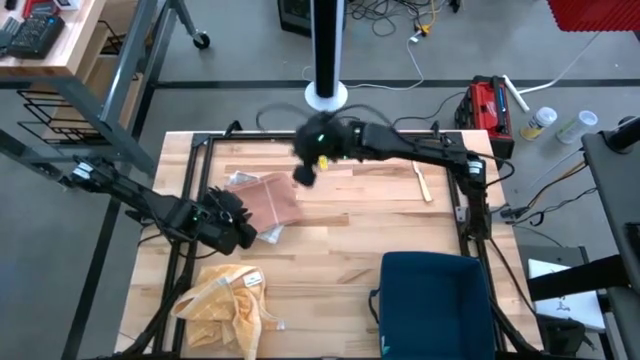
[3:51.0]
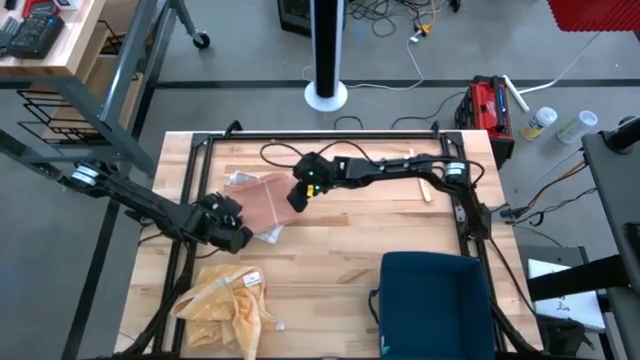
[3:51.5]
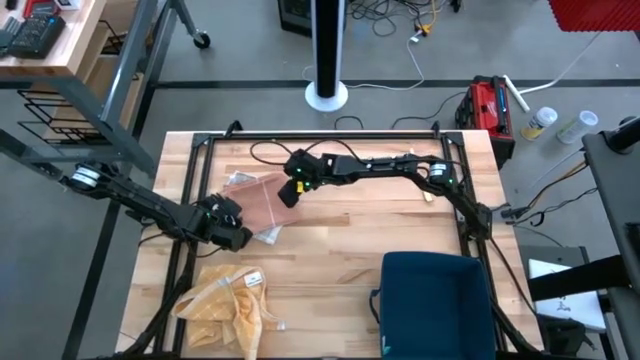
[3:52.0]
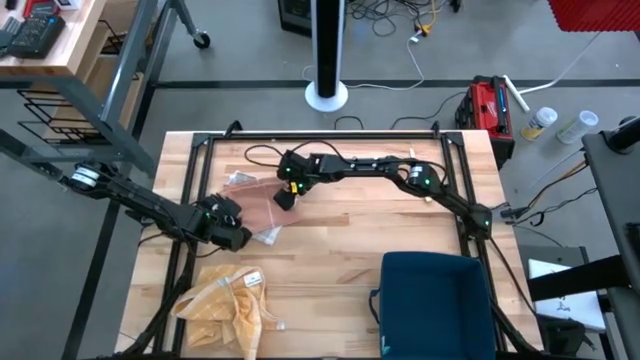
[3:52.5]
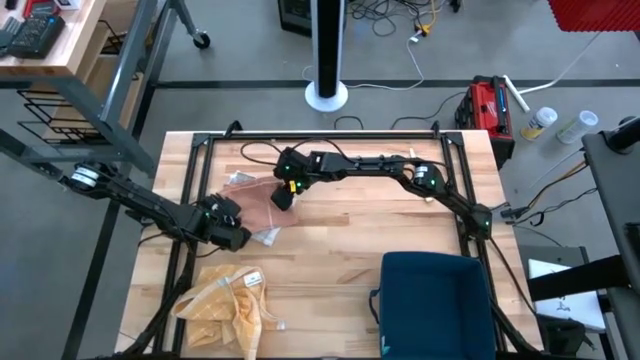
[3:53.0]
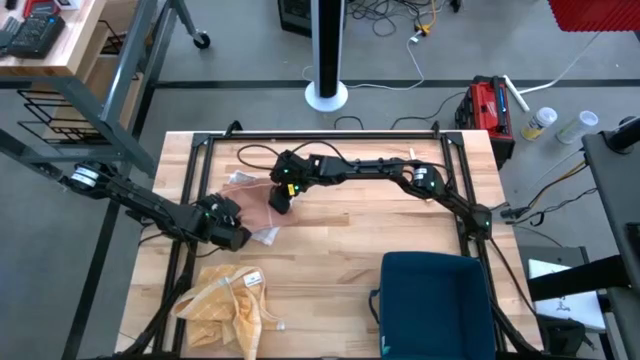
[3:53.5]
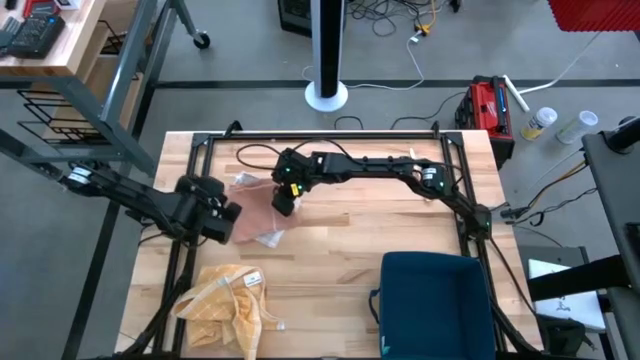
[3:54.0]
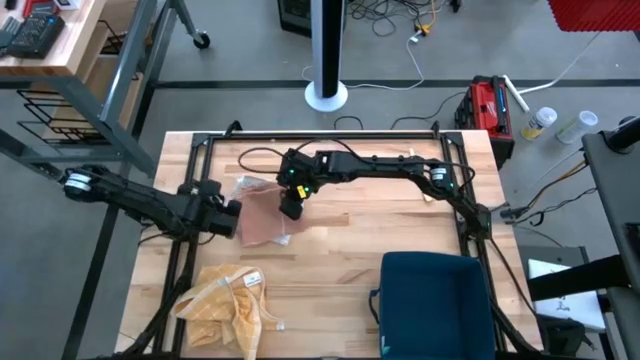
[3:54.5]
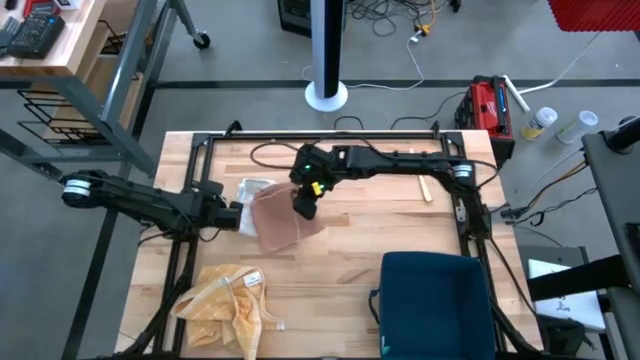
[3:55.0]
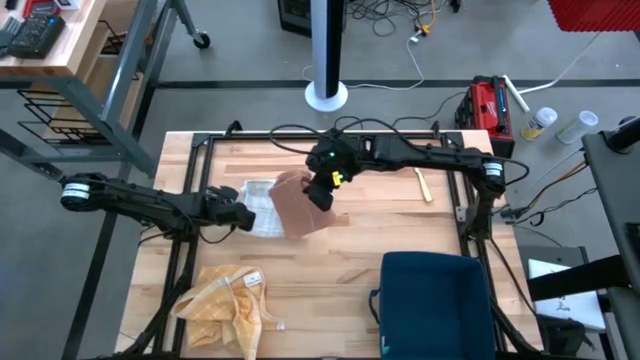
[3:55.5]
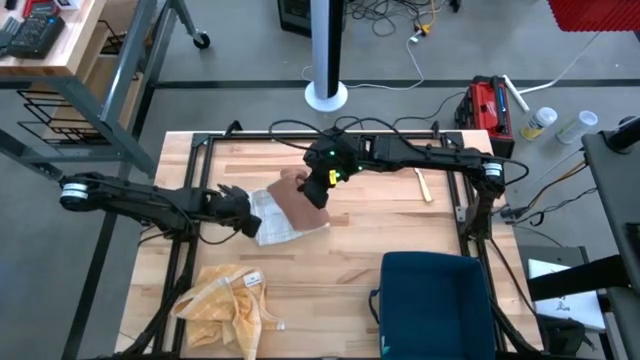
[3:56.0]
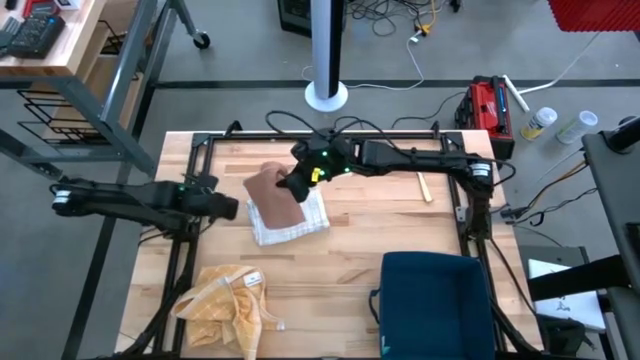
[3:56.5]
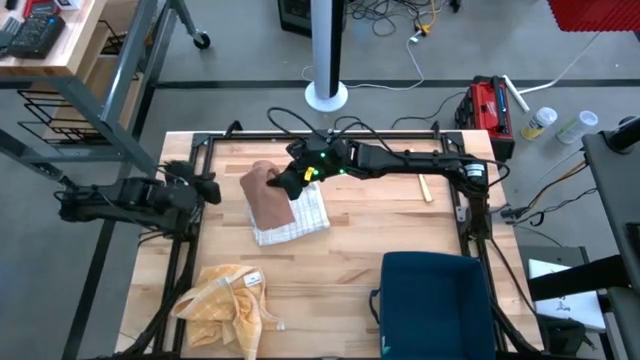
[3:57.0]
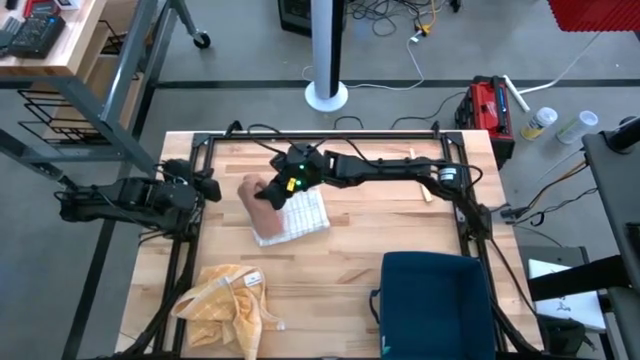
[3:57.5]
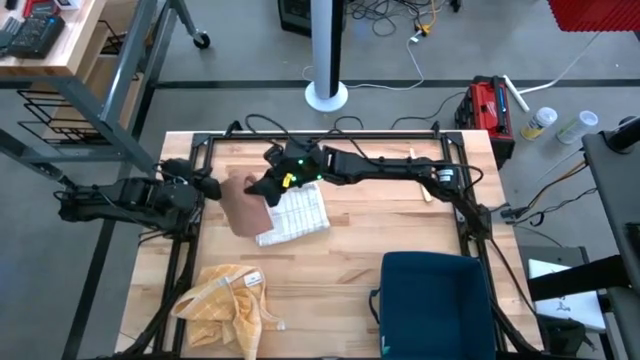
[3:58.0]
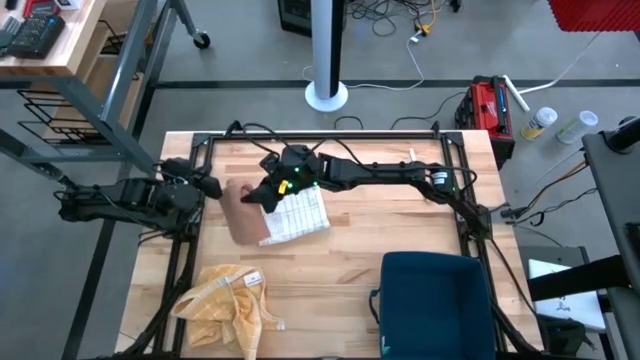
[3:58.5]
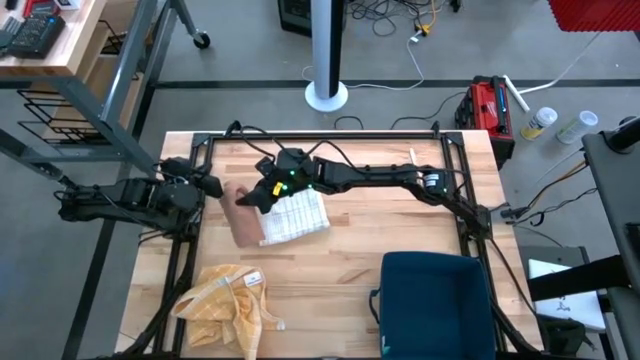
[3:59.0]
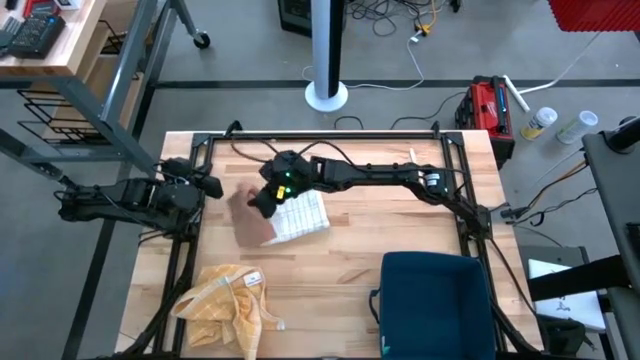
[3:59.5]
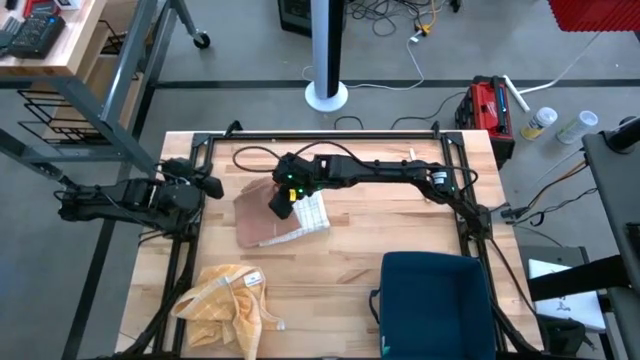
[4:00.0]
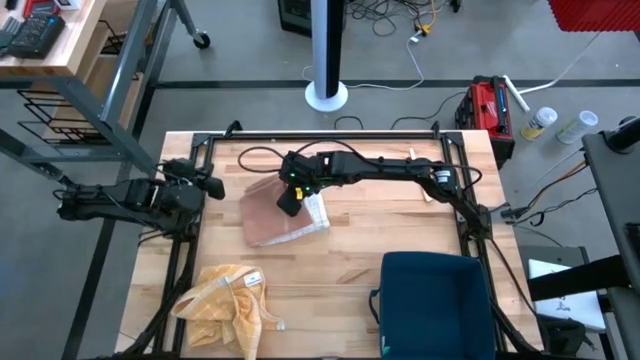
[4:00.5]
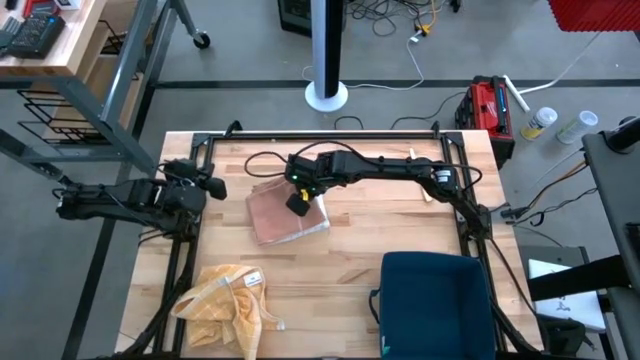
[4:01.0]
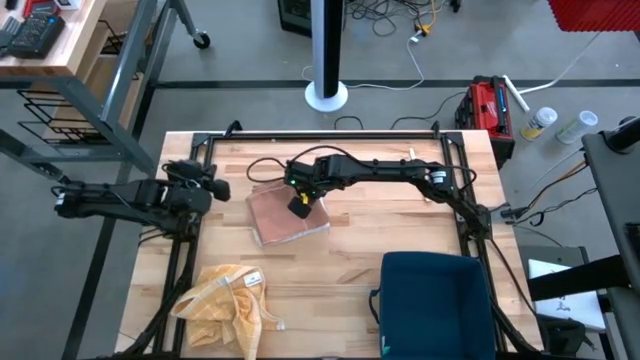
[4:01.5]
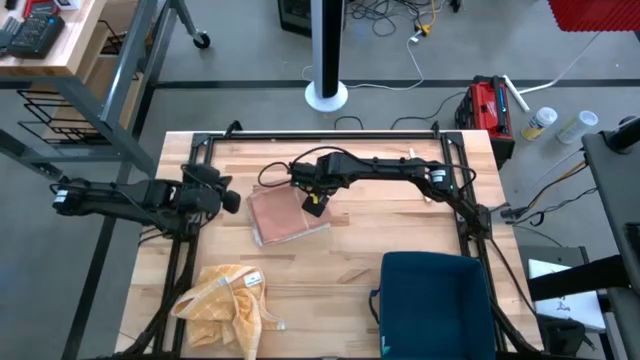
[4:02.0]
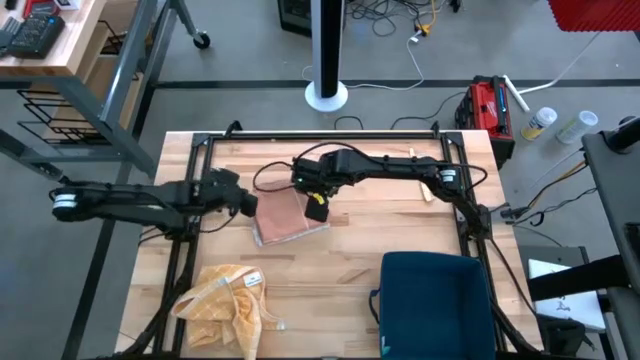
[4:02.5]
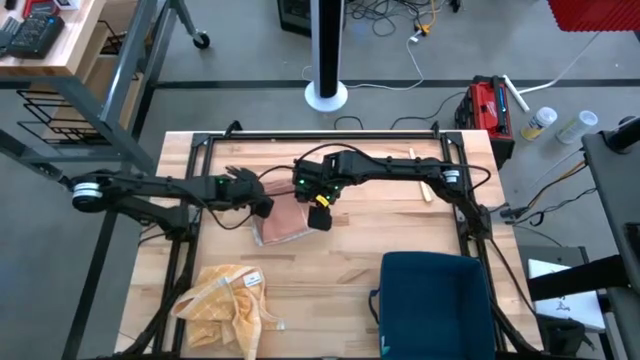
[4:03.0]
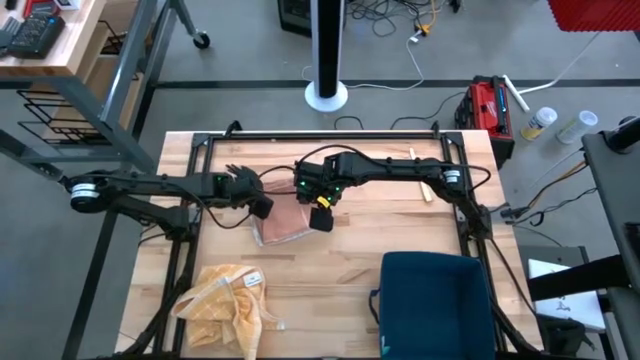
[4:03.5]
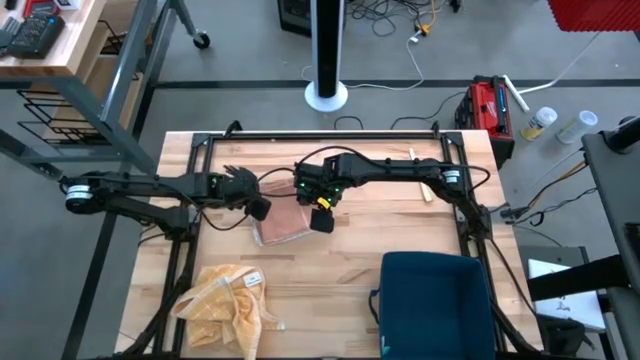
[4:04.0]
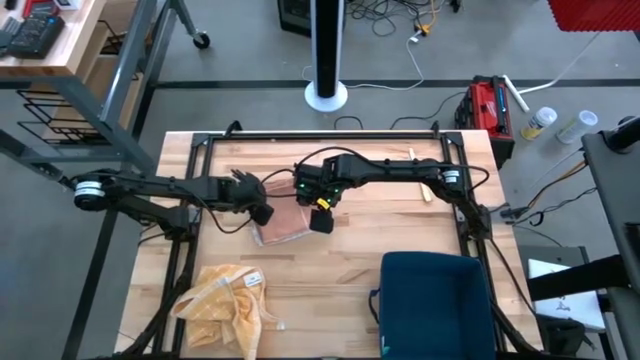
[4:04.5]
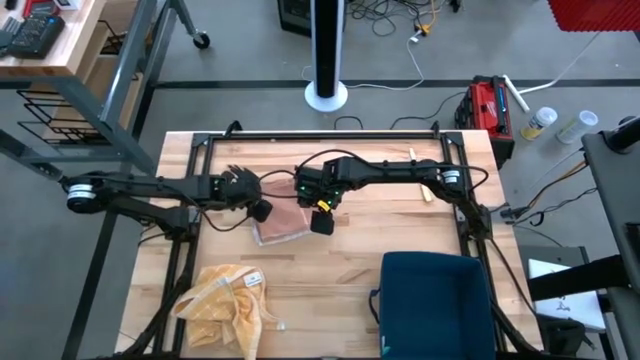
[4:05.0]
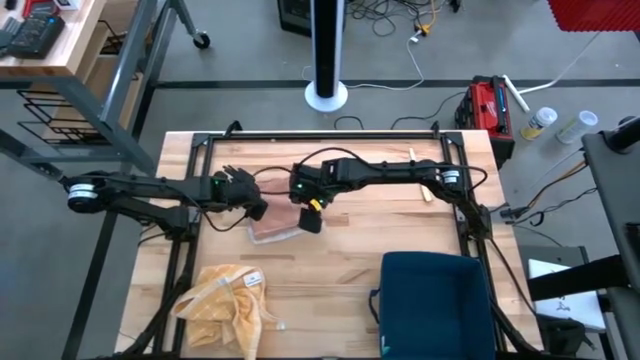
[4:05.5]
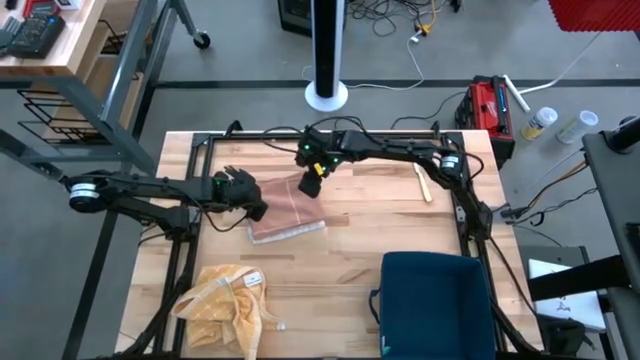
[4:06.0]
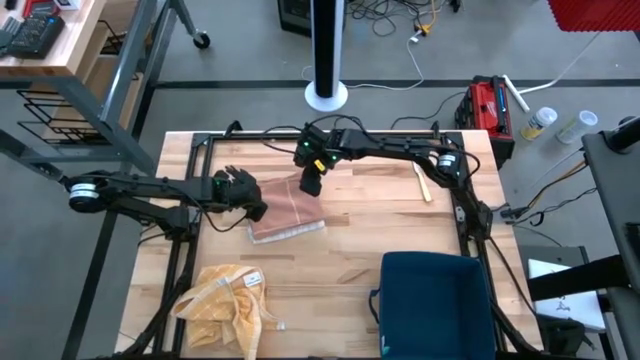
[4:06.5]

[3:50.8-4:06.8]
Task: Fold towel
Stack the brown towel on top of the white towel

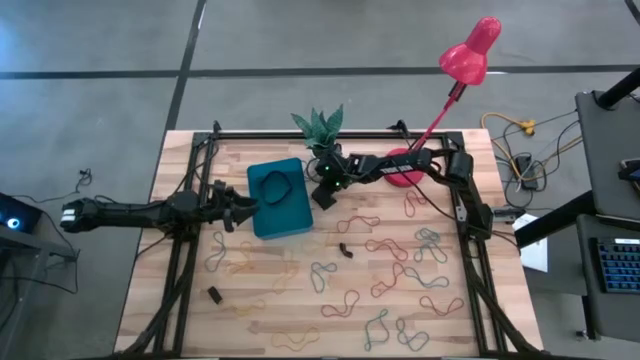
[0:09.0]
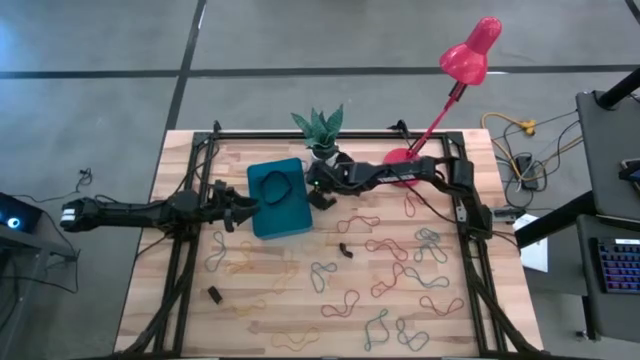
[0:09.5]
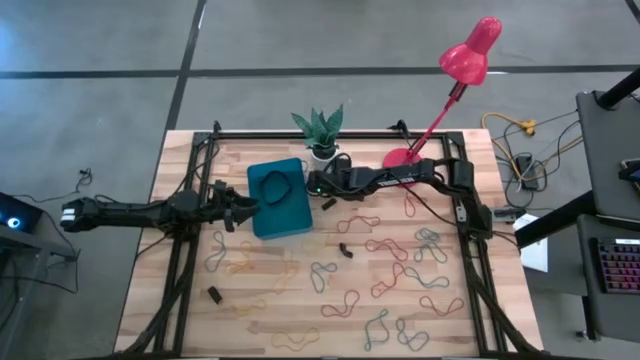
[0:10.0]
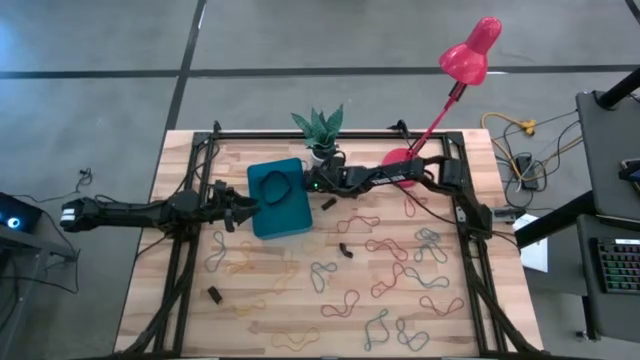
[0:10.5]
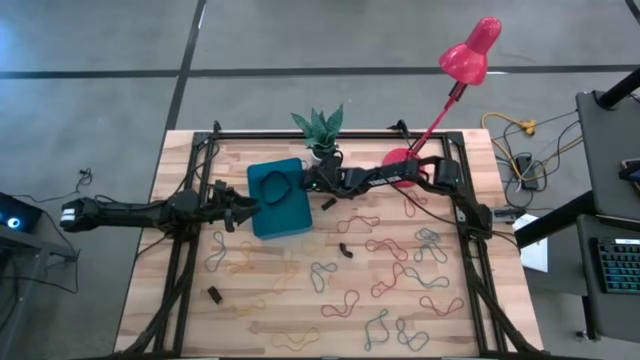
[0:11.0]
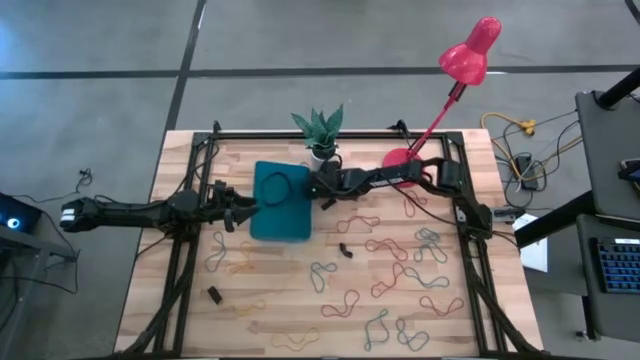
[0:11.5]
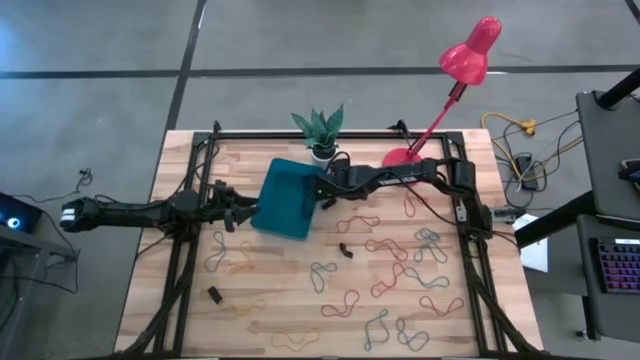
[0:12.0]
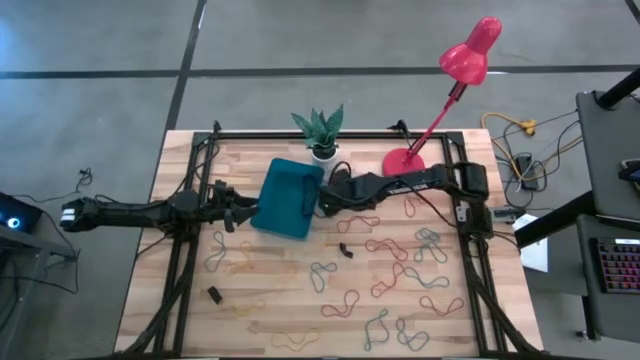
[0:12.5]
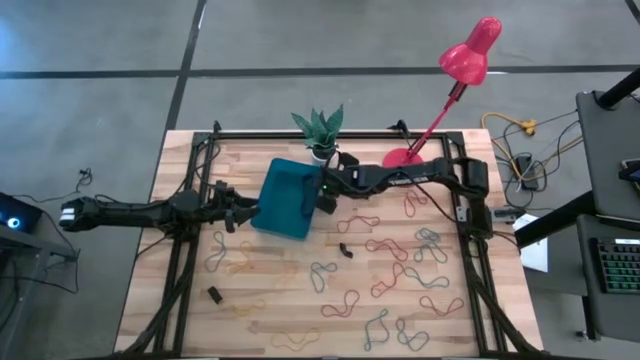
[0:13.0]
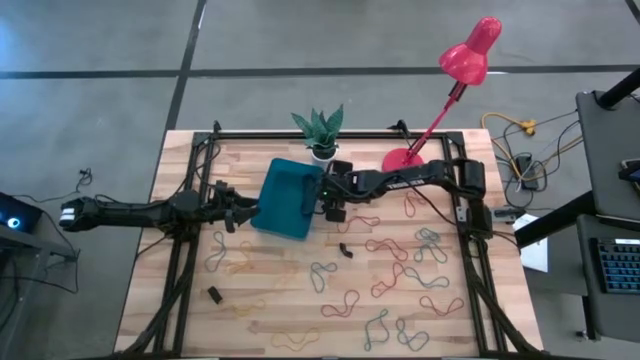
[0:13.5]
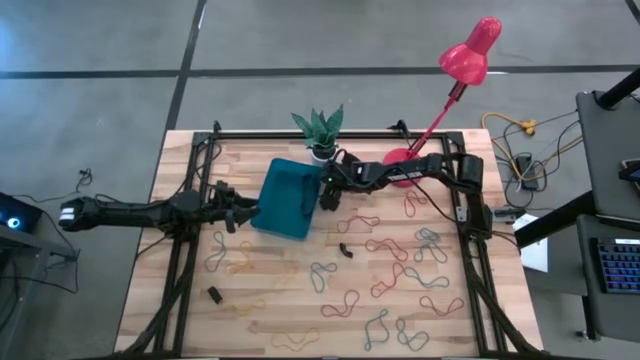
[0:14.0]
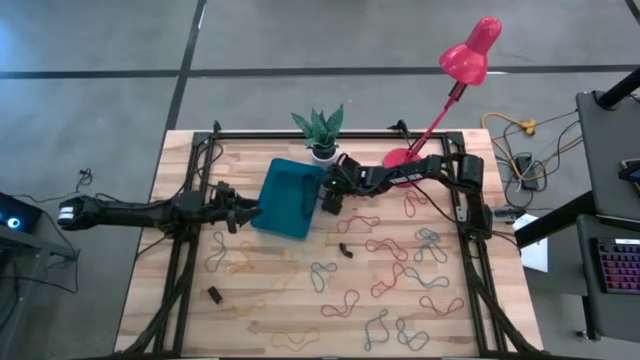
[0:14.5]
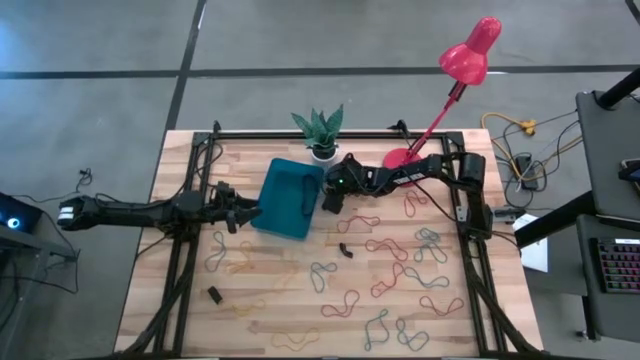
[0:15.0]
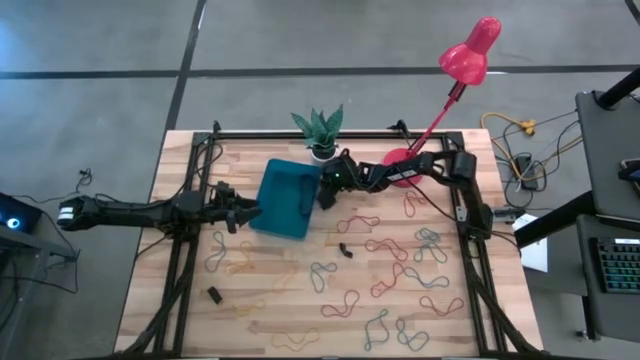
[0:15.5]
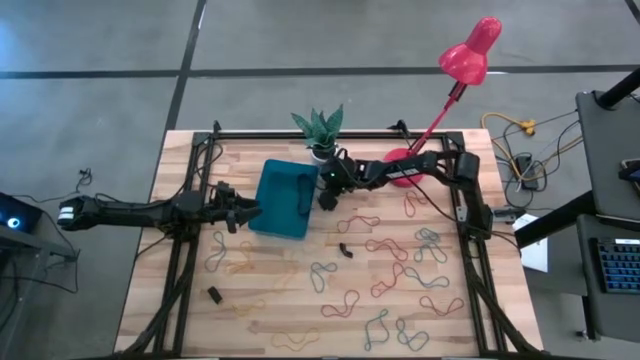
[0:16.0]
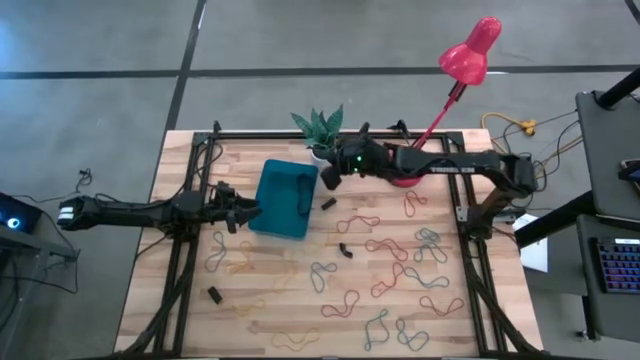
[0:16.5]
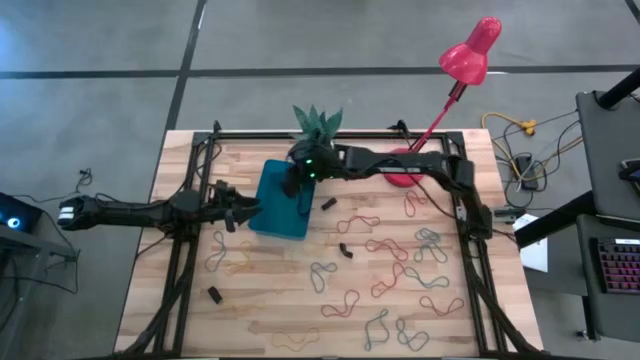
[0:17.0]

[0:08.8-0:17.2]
Task: Pick and place rubber bands into bin
Put the blue rubber band into the blue bin
